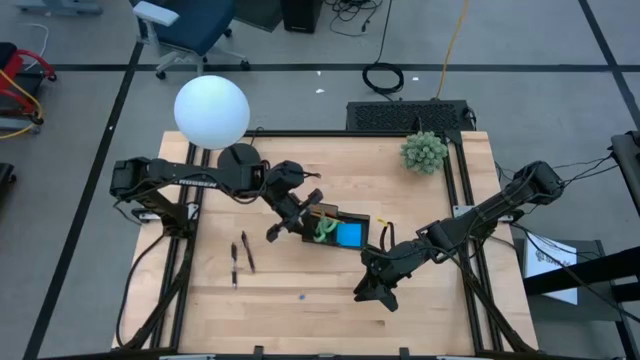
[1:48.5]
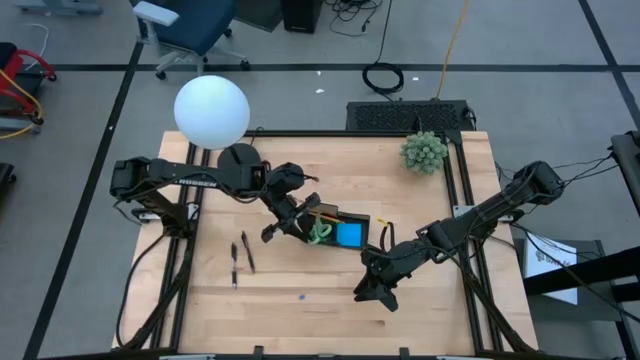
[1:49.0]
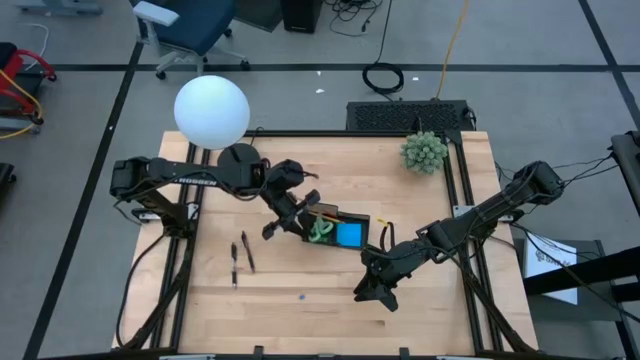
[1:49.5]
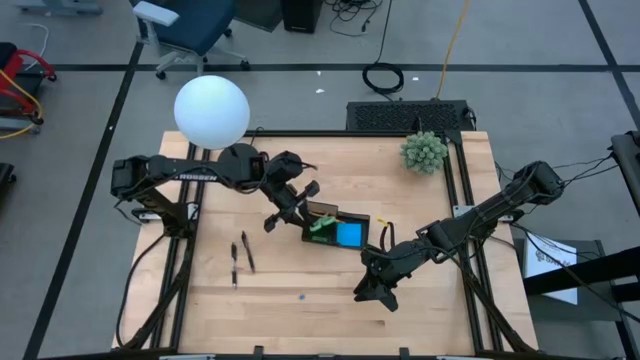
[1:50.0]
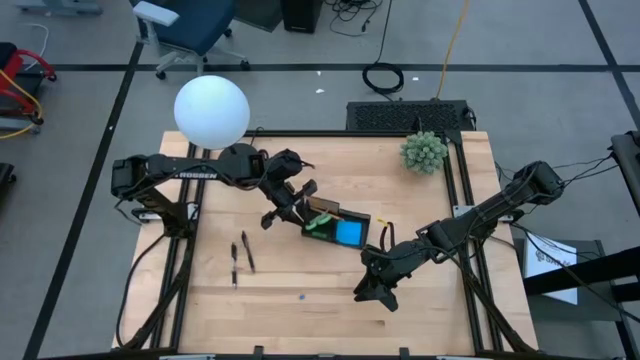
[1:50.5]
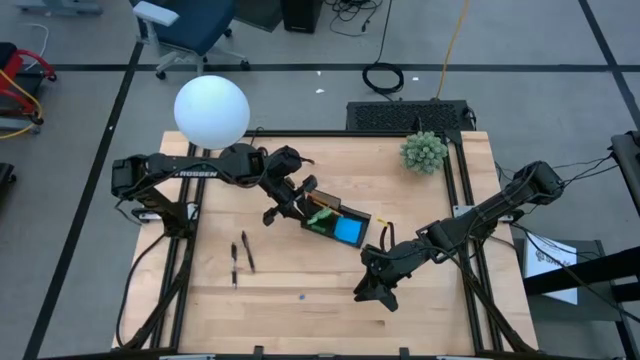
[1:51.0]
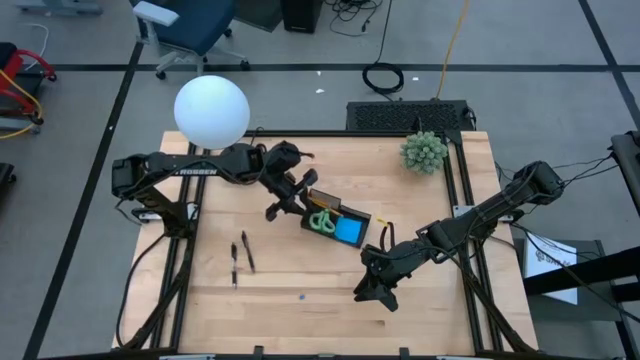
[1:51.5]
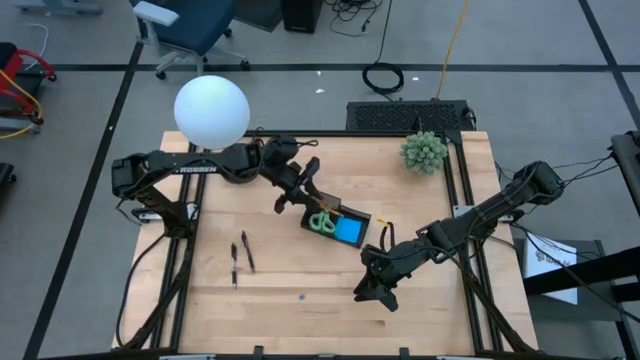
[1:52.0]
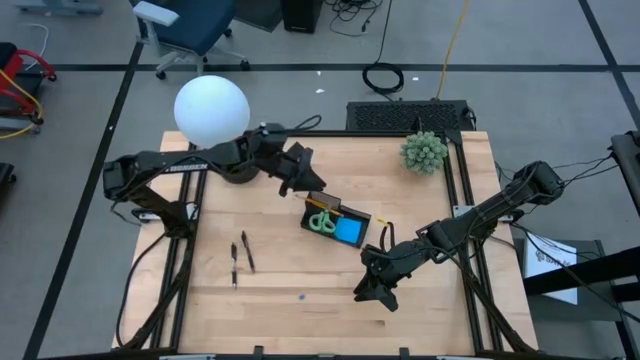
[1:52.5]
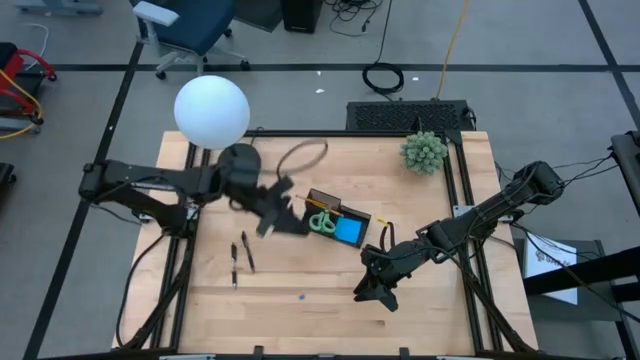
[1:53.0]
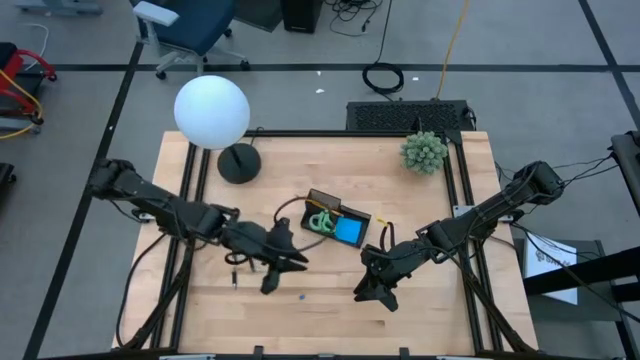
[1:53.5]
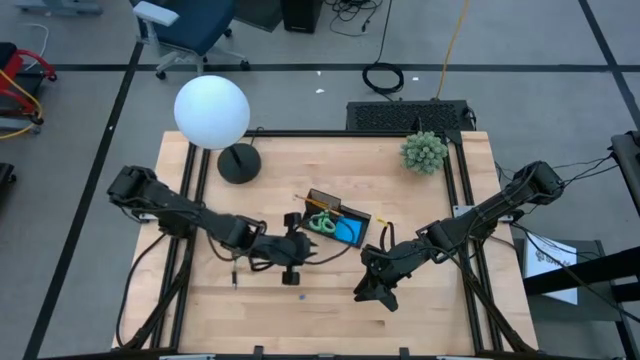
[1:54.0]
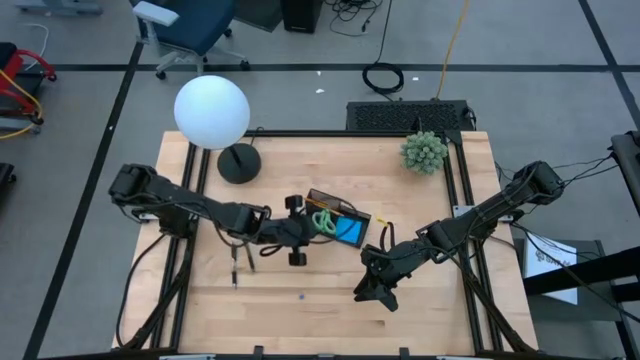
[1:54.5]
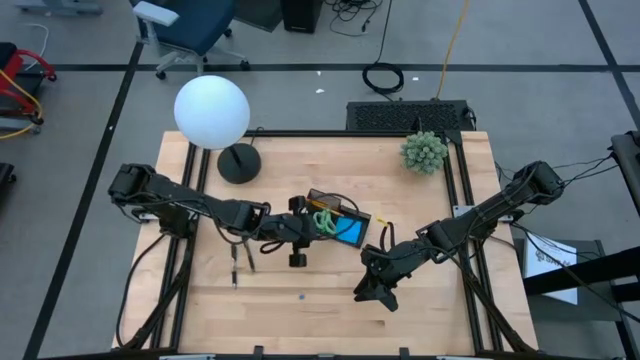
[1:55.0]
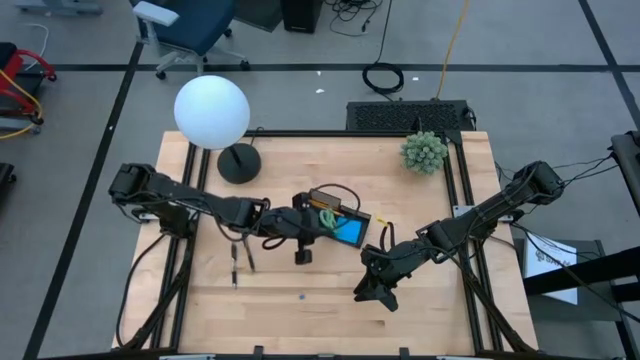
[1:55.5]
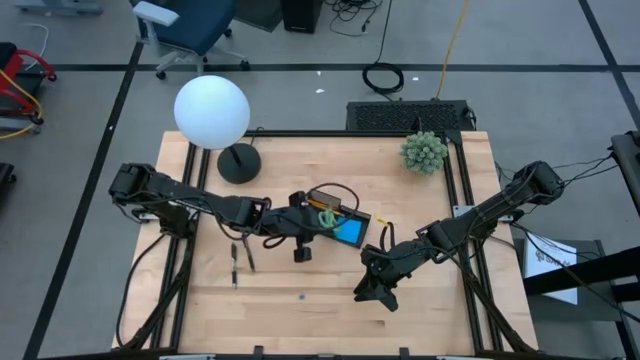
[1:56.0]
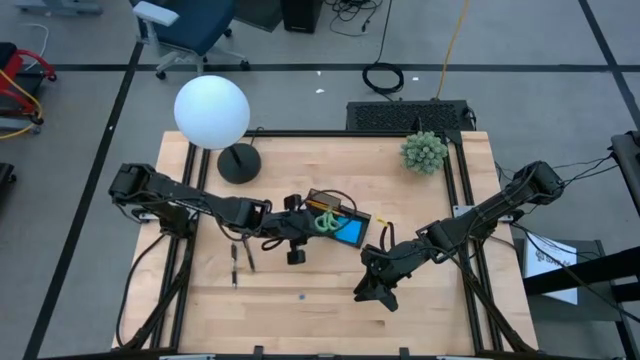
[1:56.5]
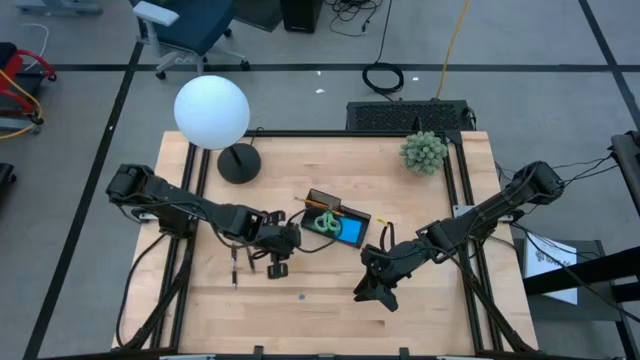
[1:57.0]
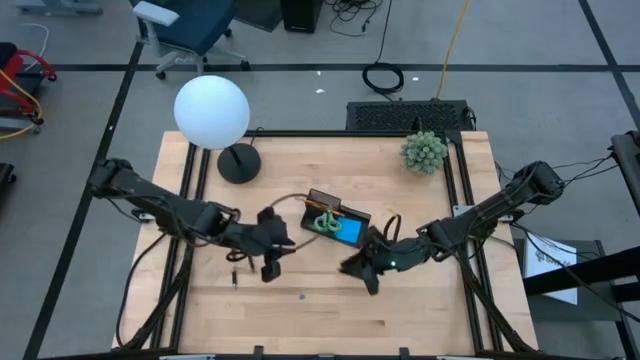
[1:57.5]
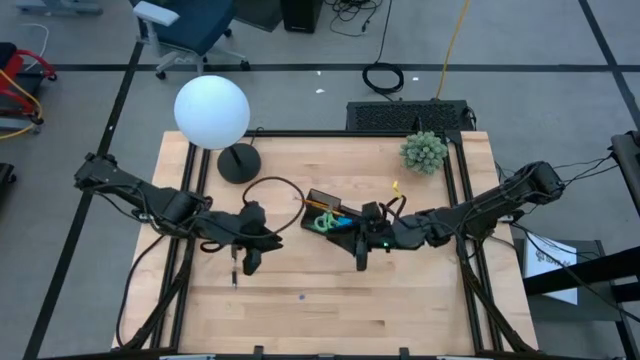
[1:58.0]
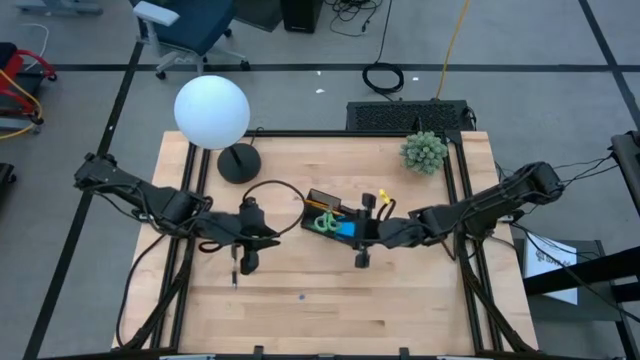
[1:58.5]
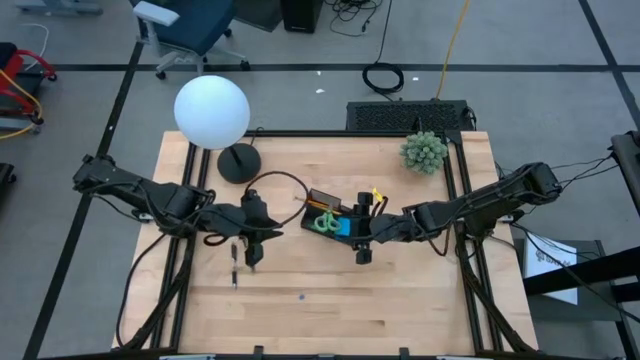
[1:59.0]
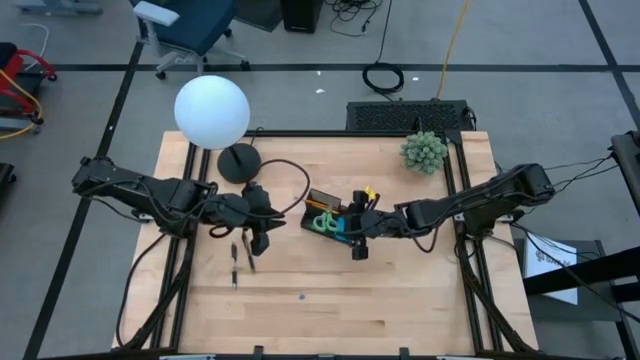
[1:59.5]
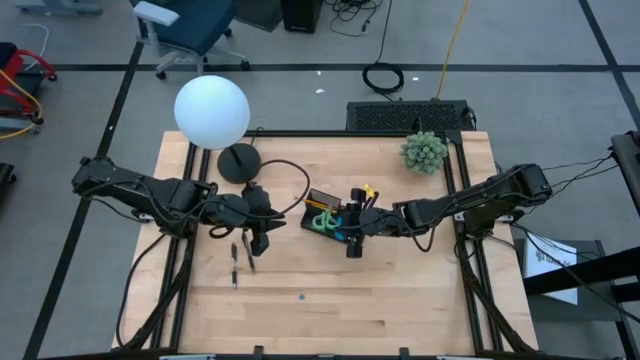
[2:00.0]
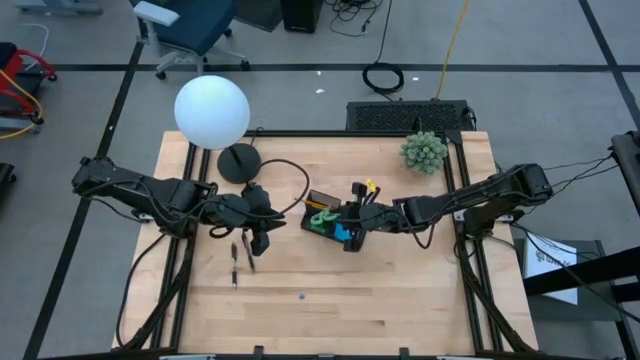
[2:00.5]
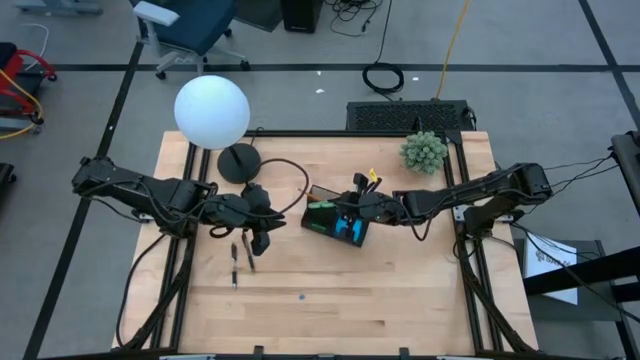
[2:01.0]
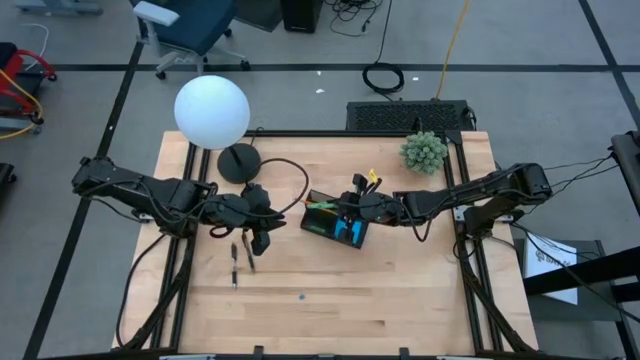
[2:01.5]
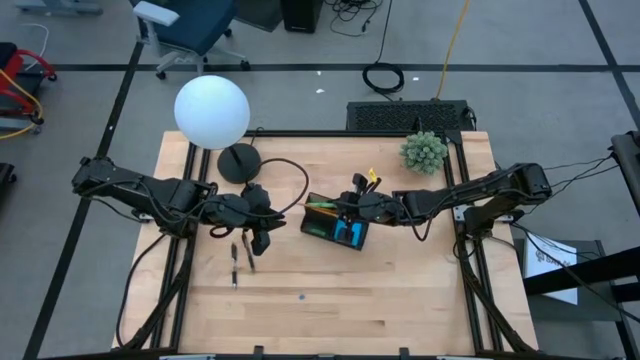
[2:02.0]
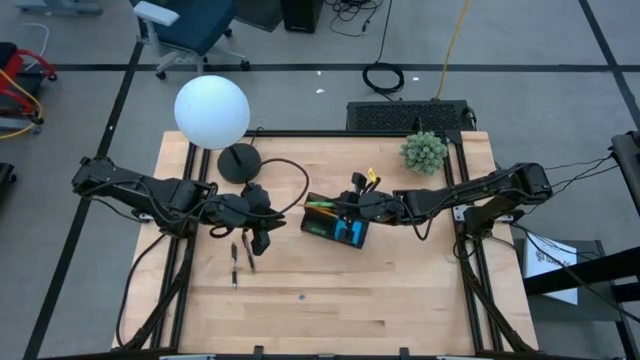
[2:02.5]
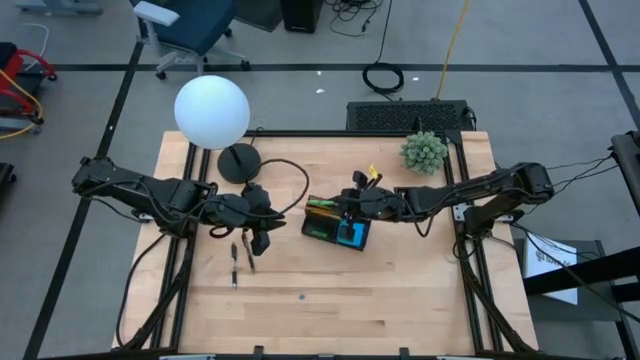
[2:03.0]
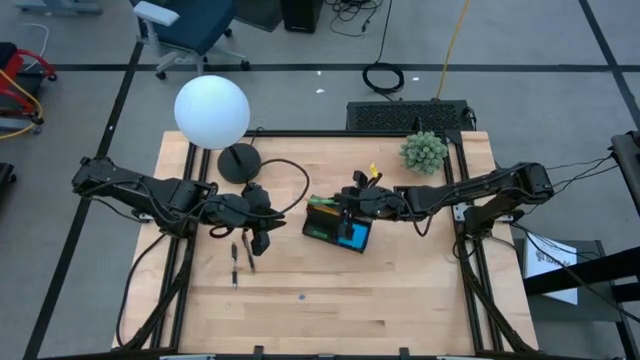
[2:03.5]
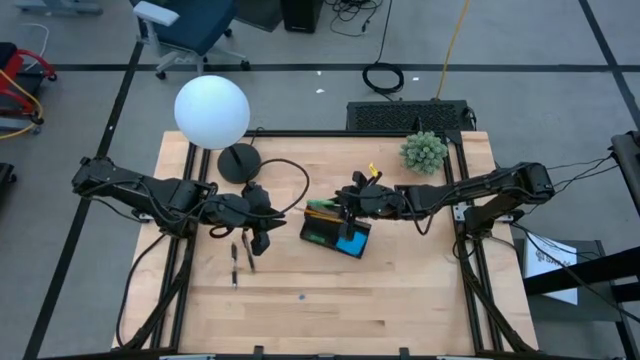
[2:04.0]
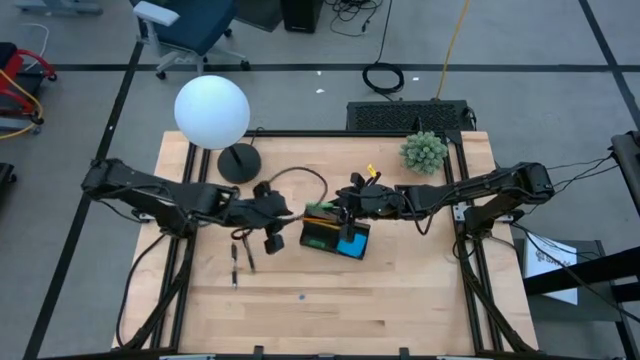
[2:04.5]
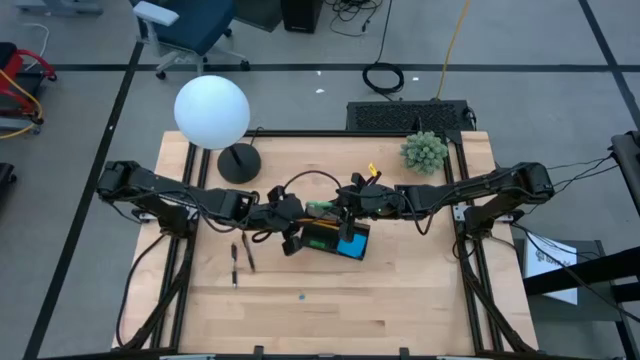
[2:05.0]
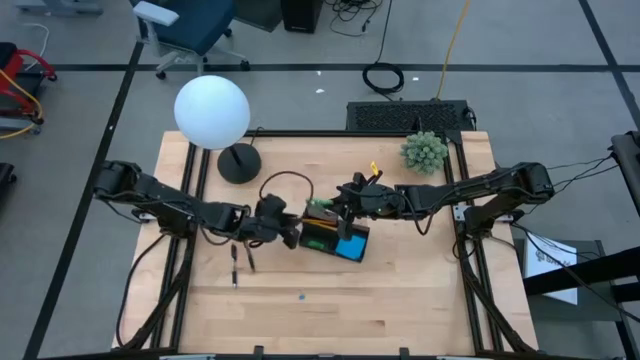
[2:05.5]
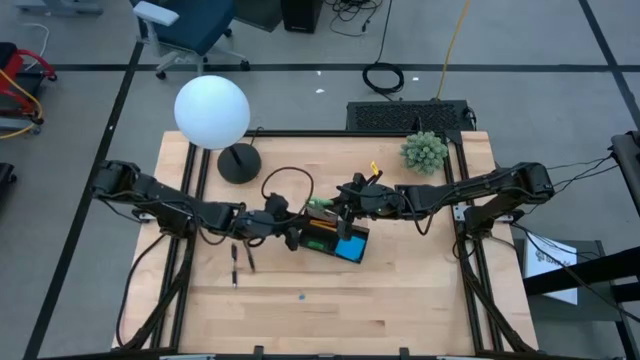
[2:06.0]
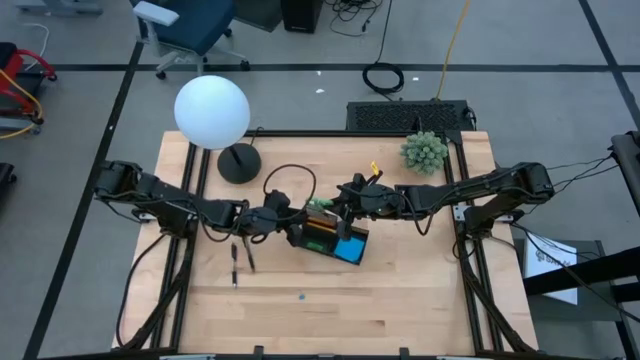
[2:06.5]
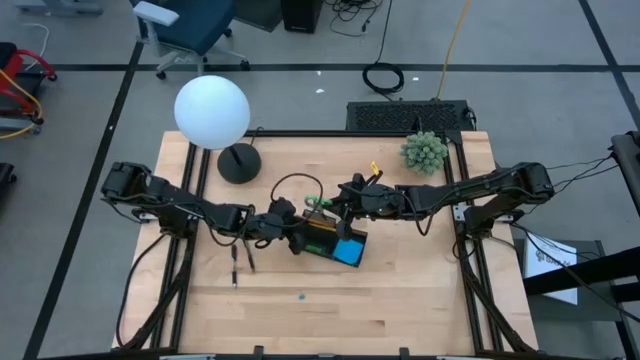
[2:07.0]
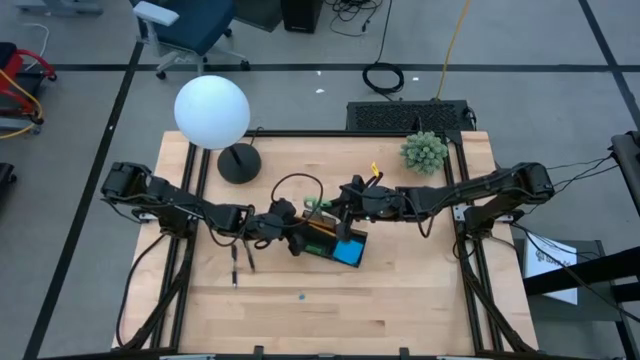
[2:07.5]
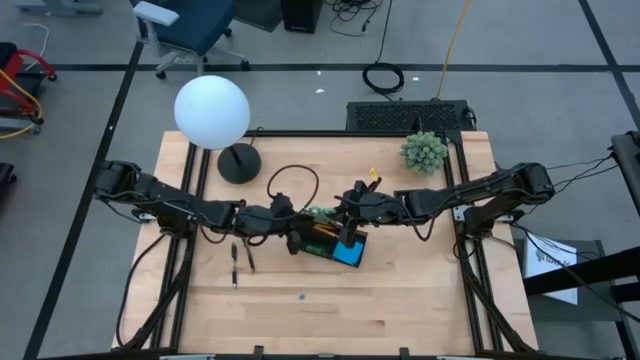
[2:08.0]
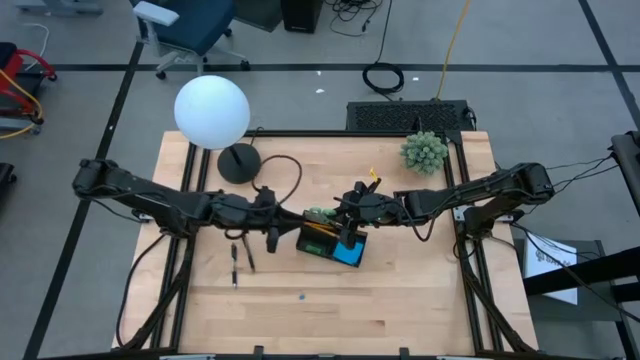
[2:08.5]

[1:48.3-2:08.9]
Task: Pick and place office supplies into organizer
Put the green scissors into the desk organizer
